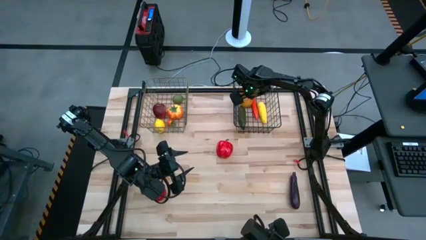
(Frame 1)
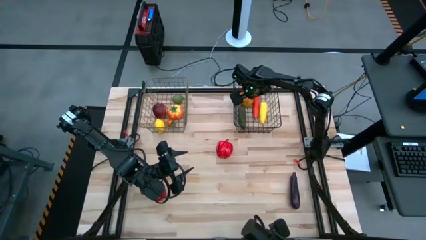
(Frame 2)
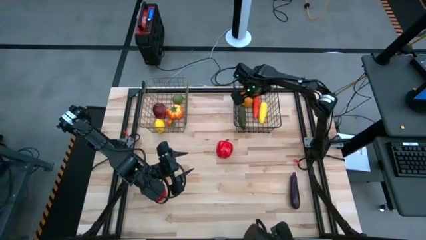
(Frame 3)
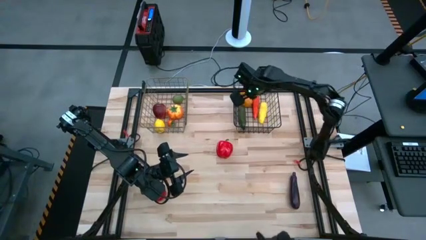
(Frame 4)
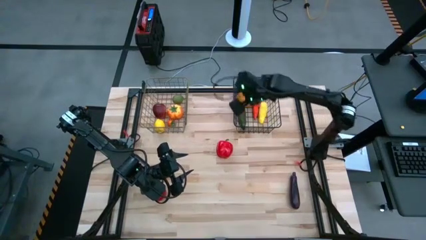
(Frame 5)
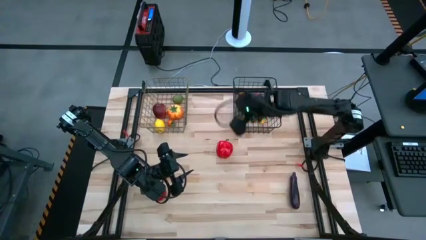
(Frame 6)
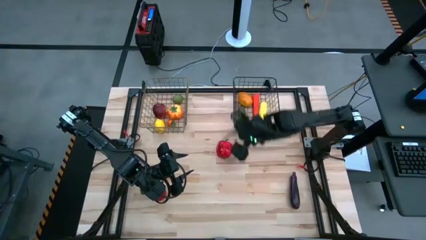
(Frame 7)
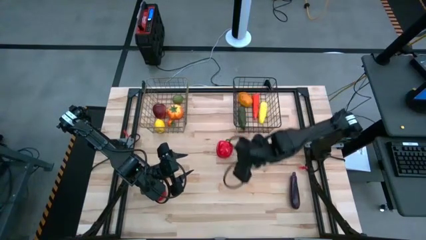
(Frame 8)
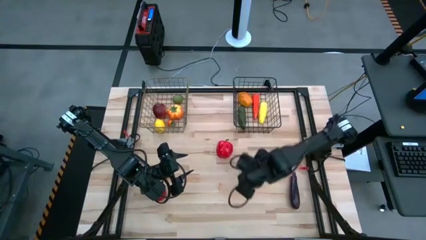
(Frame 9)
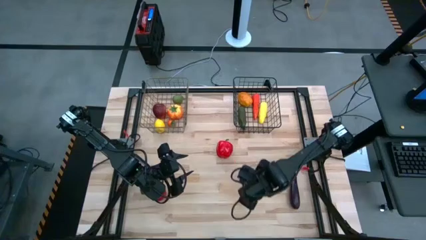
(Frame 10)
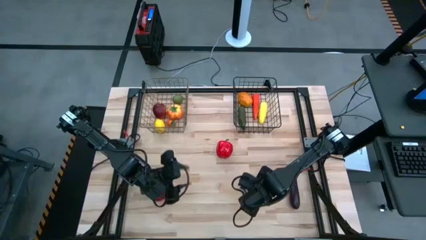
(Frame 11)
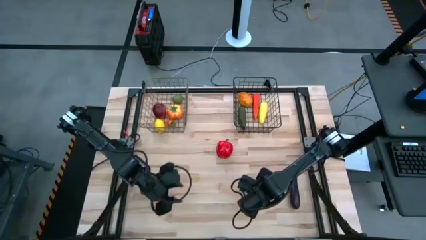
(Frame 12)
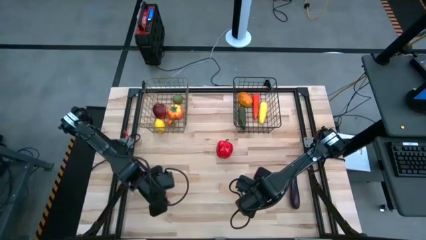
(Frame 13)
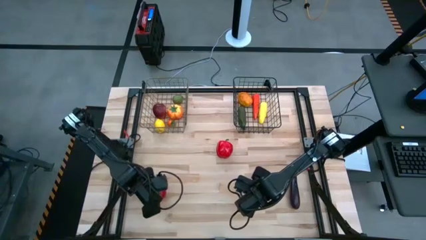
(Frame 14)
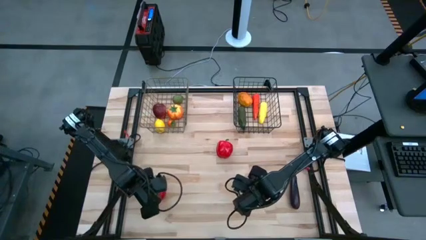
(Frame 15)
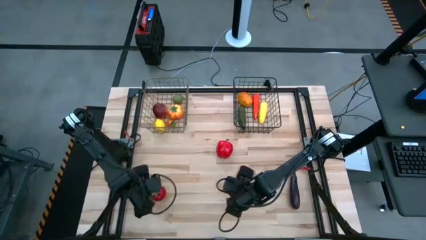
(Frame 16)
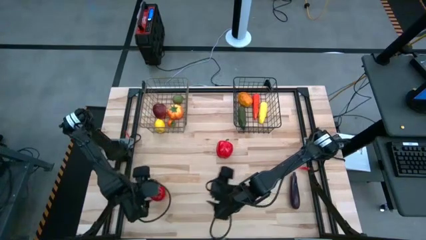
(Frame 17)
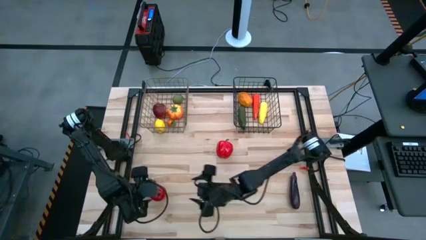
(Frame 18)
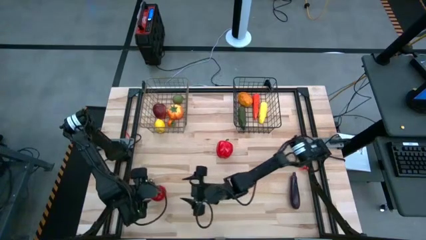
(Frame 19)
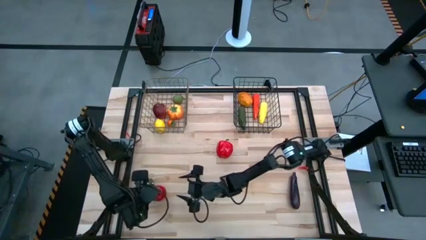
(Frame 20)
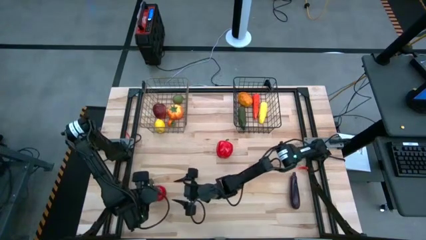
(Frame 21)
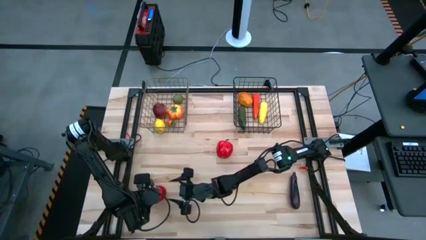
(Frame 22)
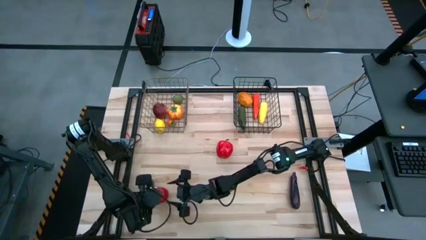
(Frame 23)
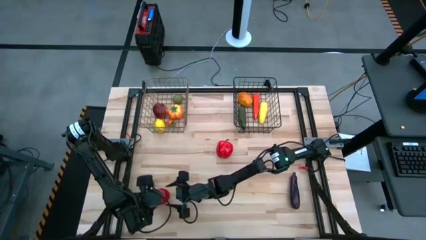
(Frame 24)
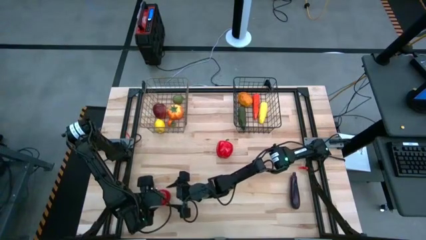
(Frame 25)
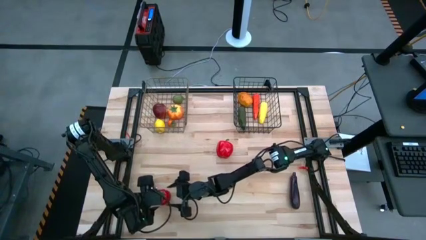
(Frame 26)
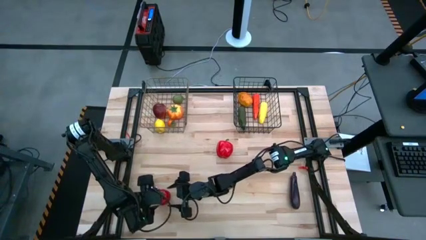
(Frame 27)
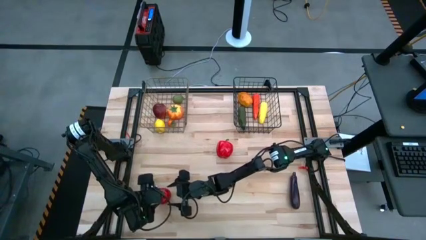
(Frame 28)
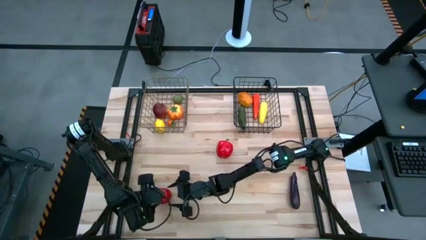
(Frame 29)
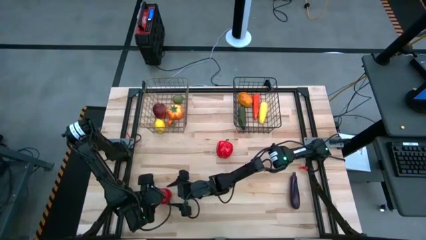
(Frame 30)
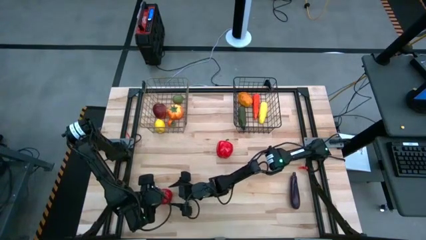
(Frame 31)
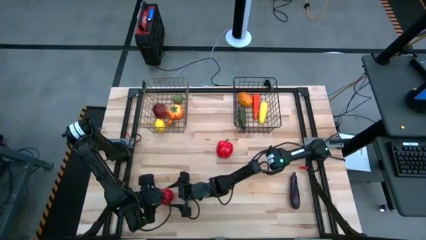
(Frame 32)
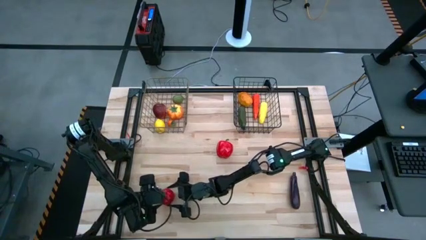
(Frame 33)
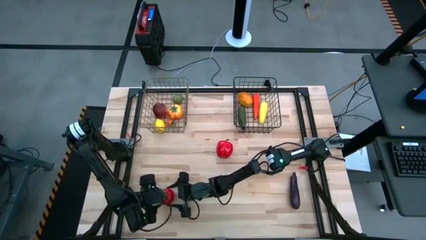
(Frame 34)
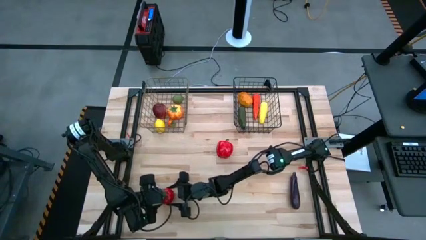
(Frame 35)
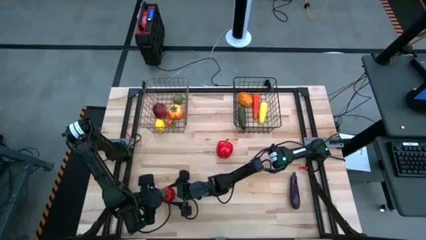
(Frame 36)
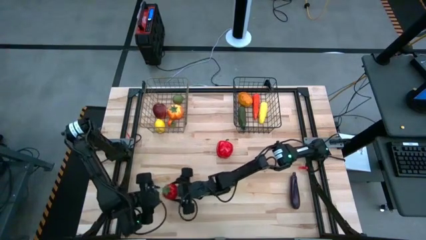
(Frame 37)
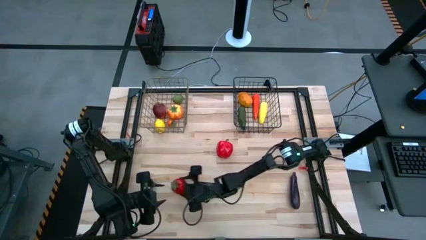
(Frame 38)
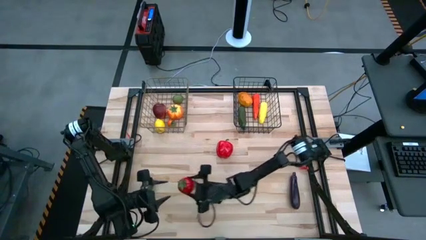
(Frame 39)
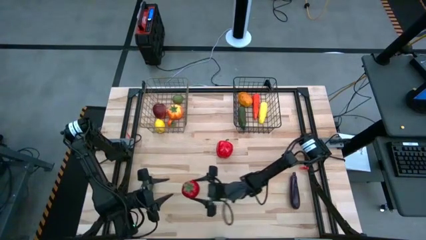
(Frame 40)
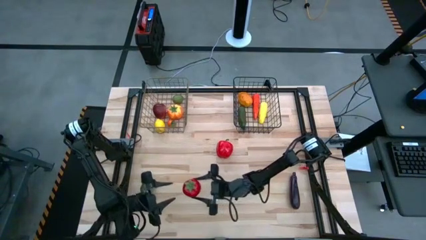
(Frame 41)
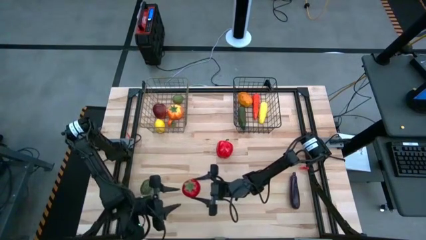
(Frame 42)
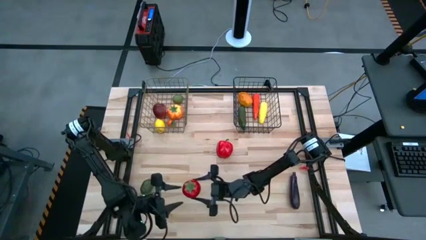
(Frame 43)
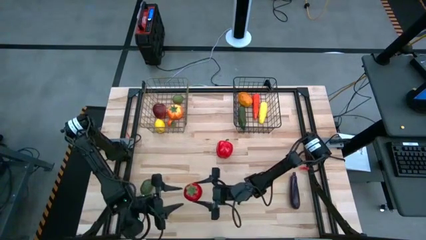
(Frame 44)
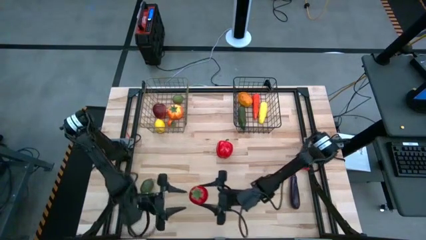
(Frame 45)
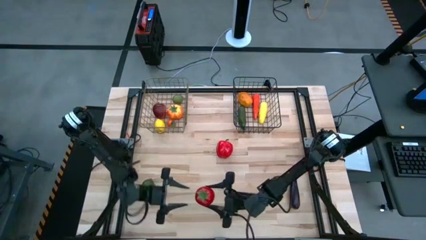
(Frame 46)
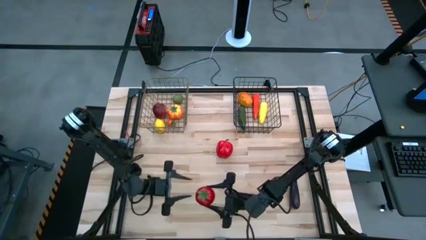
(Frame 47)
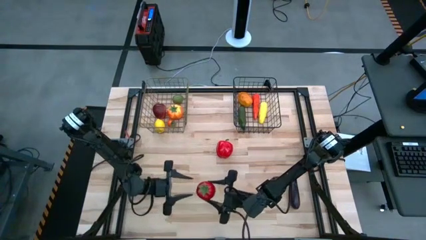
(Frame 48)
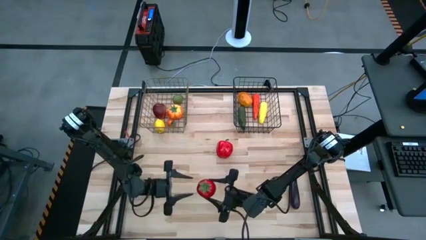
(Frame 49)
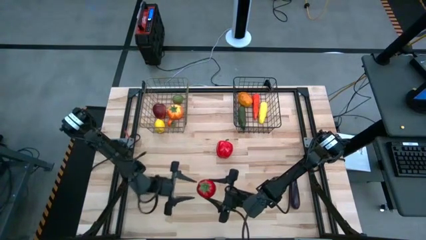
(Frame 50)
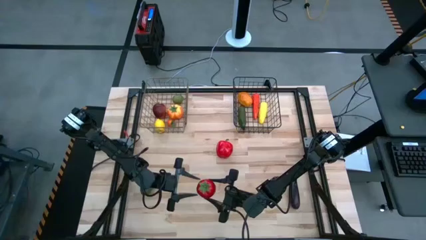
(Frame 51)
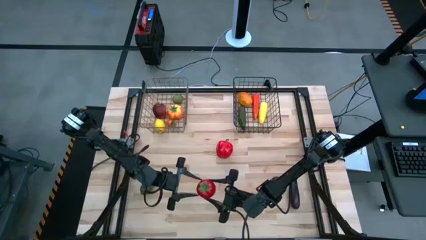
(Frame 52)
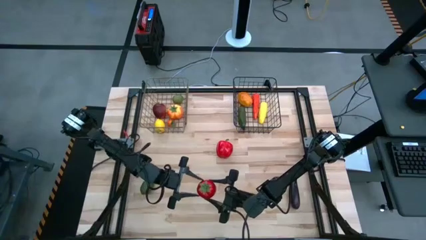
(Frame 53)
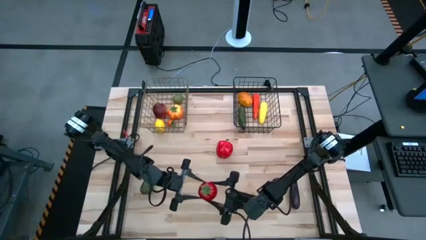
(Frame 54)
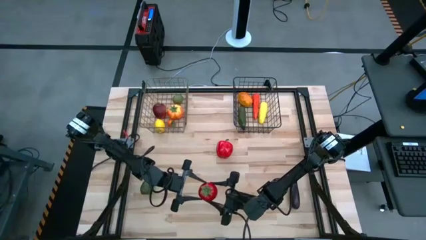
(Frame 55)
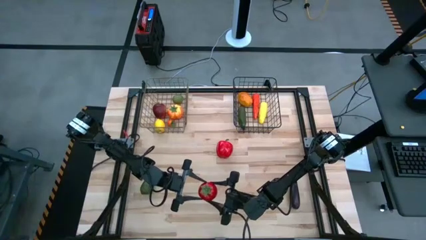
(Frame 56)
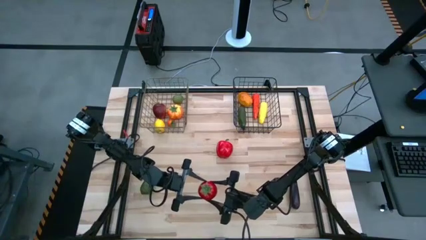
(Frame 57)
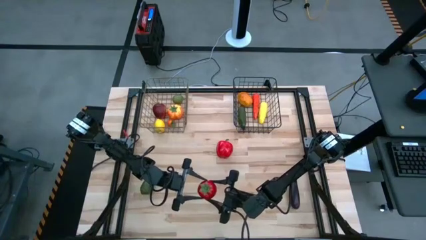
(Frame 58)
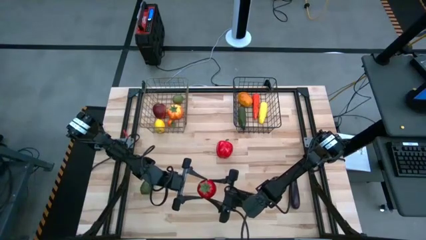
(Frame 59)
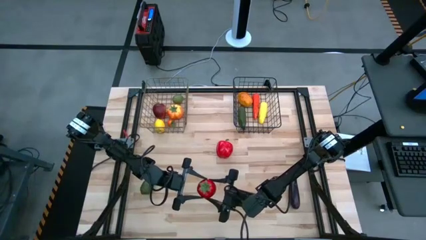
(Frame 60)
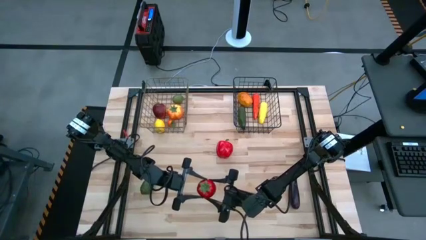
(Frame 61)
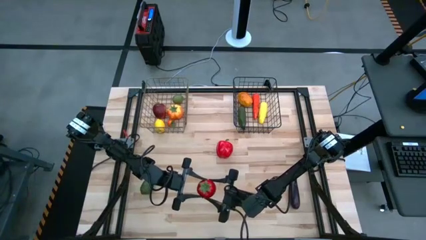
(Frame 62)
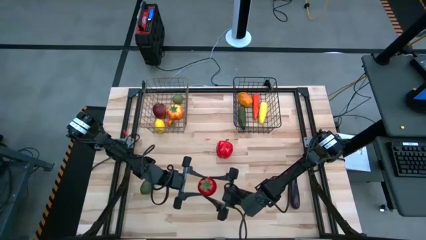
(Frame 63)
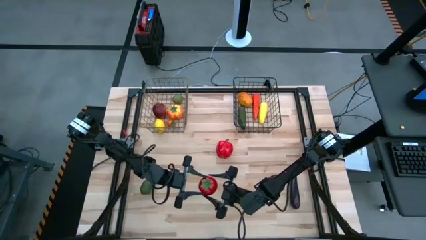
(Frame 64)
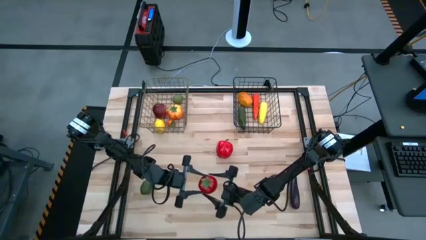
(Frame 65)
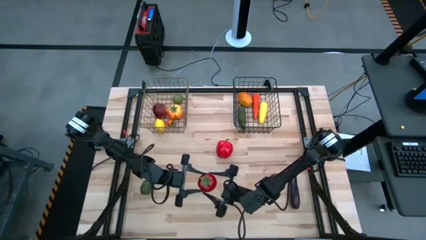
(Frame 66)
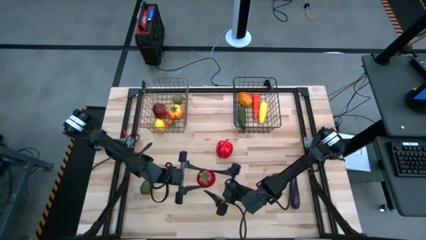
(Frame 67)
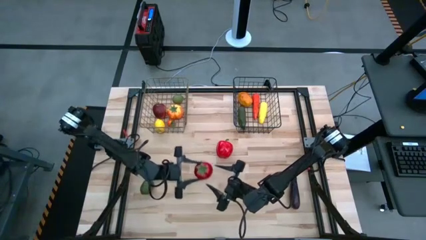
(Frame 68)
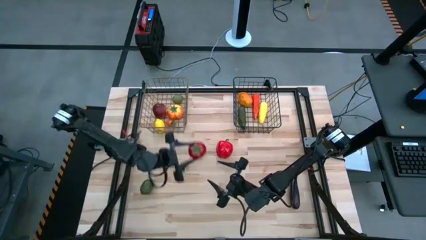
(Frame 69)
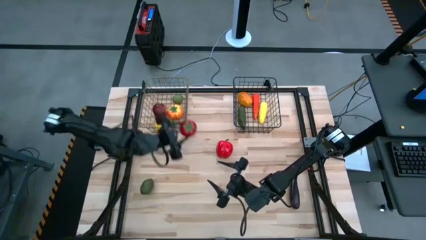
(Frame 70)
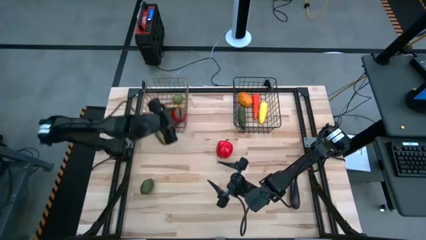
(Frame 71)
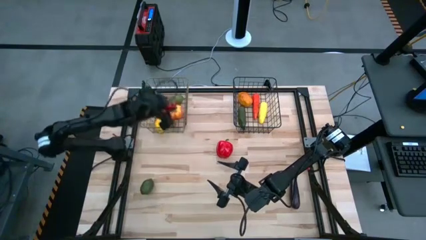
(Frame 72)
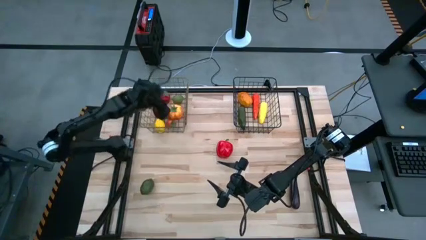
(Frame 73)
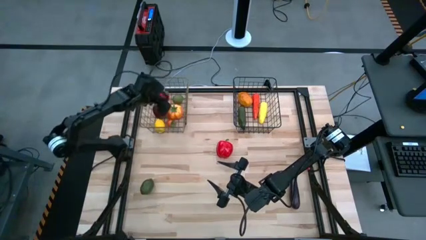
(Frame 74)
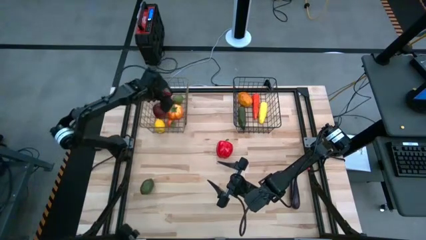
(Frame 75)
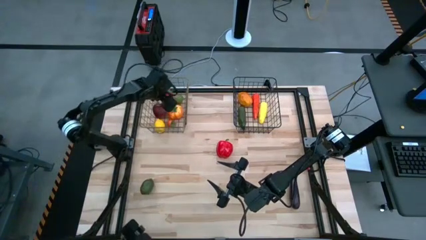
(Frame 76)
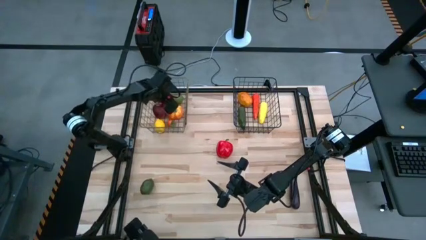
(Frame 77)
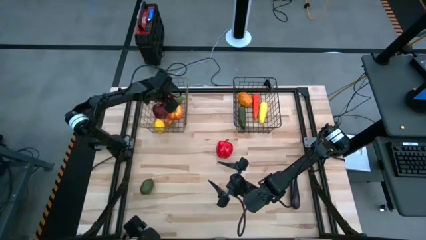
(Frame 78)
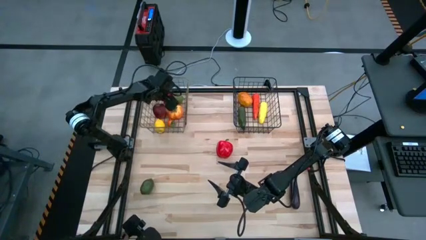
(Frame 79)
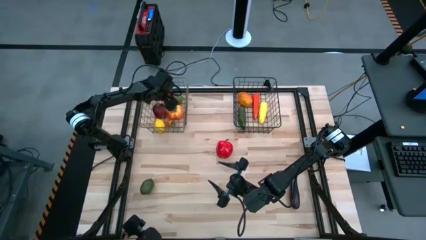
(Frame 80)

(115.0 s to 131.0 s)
Task: Sort produce into baskets
Put the red tomato into the left yellow wire basket

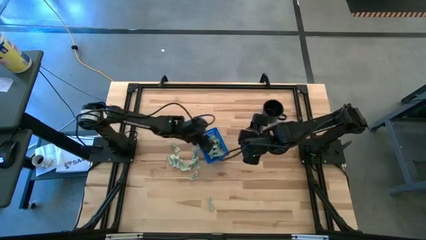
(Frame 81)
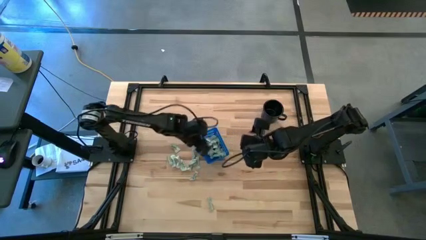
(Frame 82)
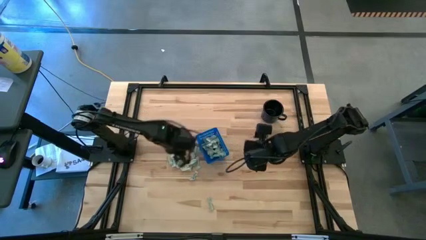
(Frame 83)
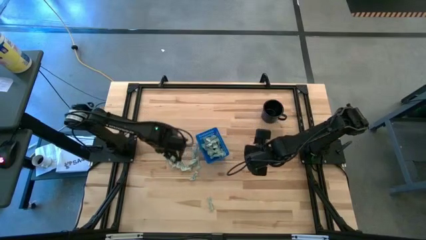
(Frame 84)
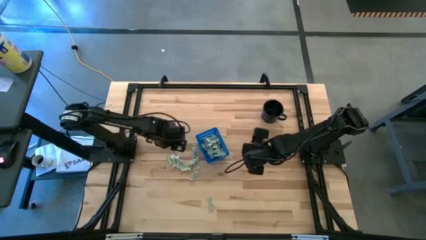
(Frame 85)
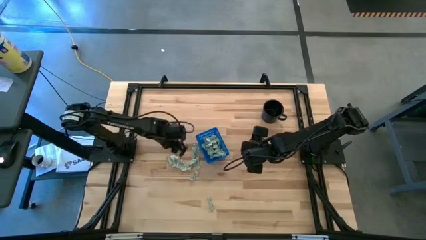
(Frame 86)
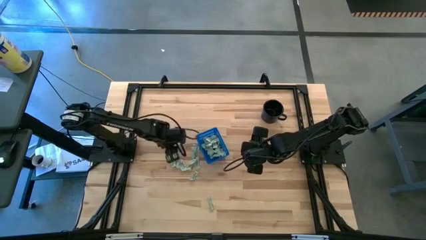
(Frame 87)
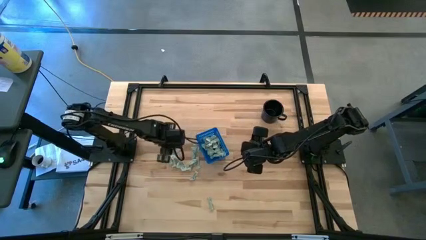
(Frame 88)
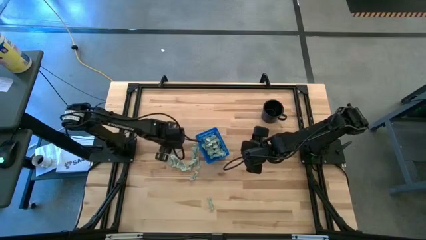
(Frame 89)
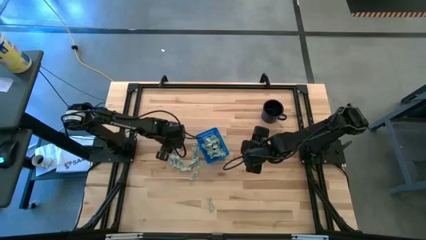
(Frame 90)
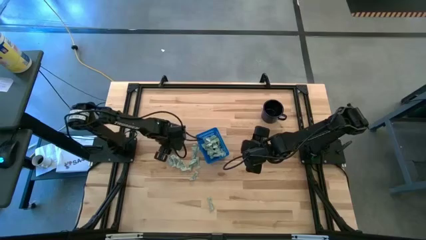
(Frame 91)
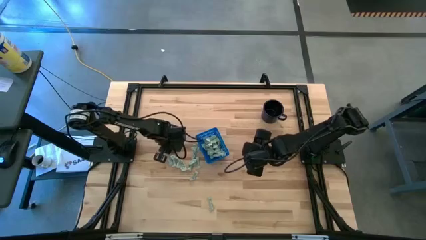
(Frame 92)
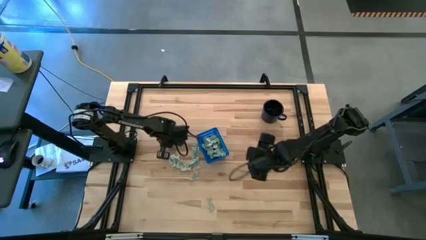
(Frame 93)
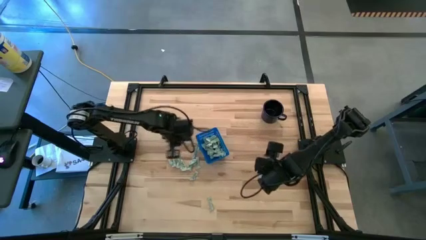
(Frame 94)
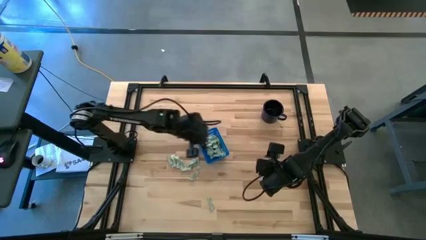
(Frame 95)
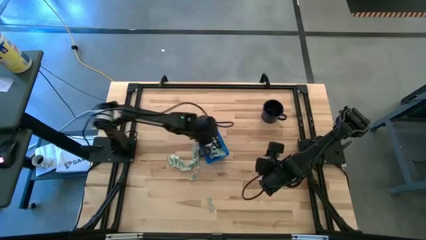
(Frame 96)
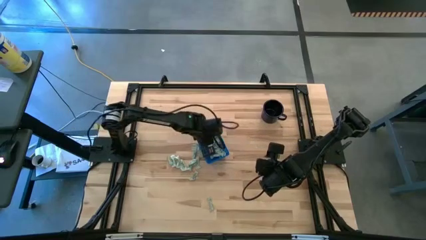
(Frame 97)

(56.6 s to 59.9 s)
Task: Pick and place Stevia / Truvia into bins
Put the stevia packet into the basket
